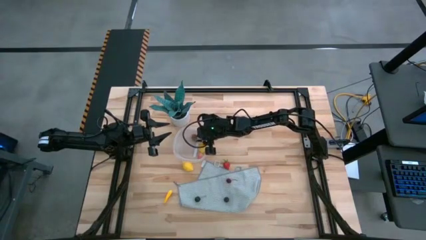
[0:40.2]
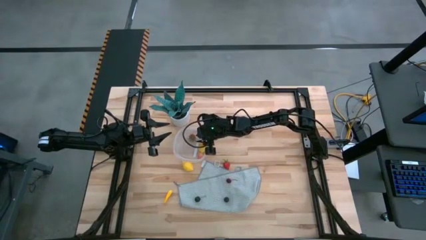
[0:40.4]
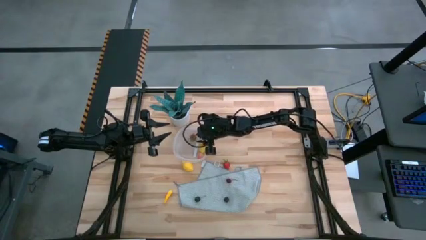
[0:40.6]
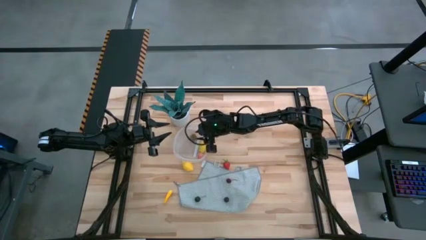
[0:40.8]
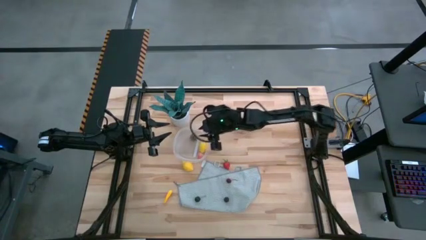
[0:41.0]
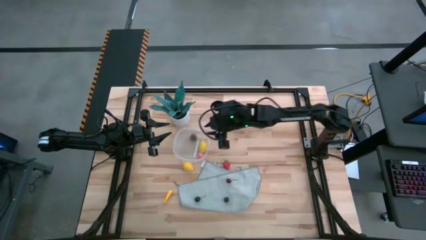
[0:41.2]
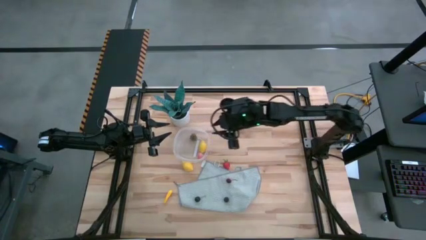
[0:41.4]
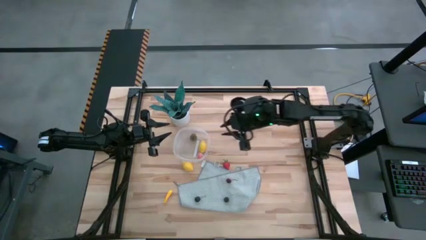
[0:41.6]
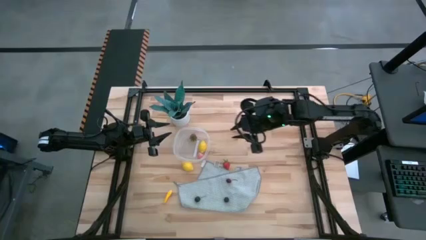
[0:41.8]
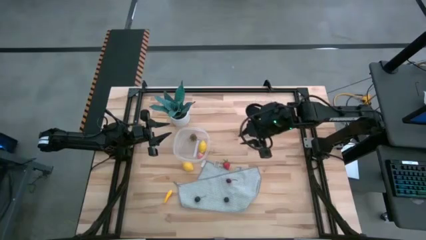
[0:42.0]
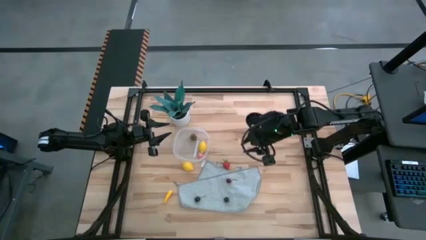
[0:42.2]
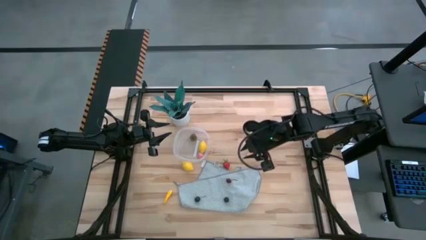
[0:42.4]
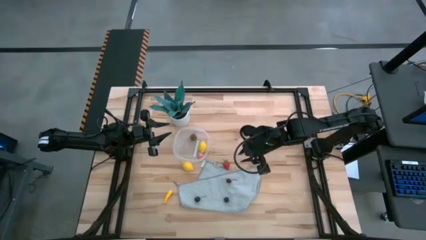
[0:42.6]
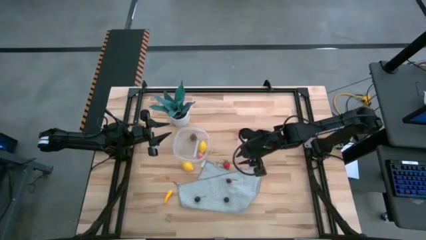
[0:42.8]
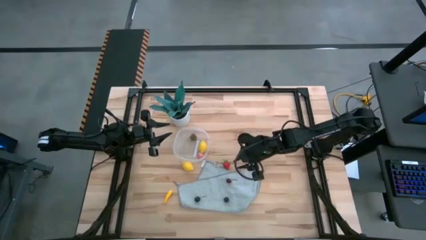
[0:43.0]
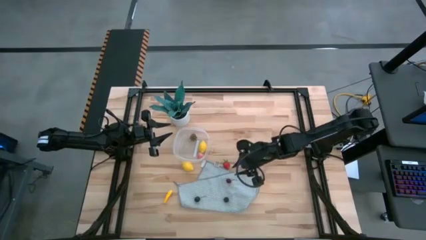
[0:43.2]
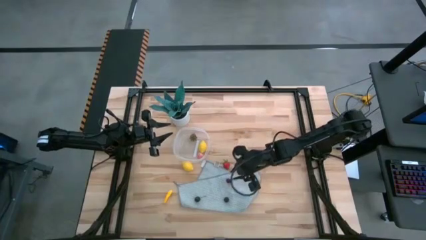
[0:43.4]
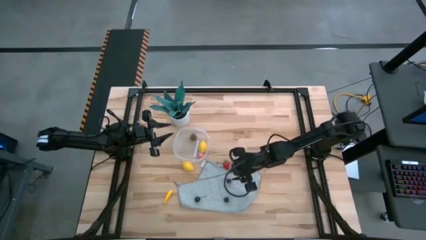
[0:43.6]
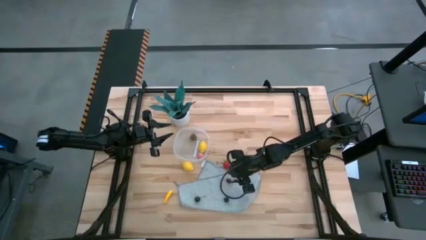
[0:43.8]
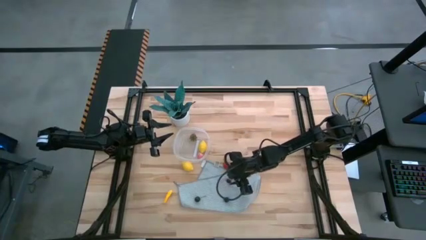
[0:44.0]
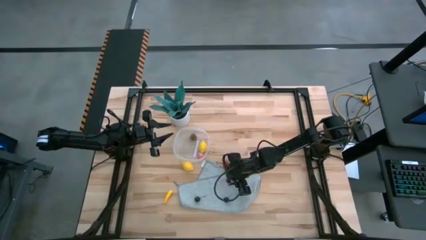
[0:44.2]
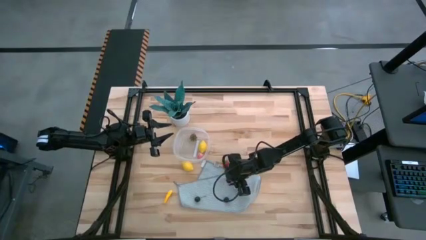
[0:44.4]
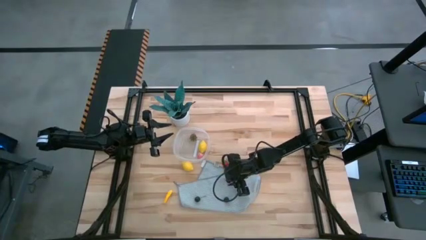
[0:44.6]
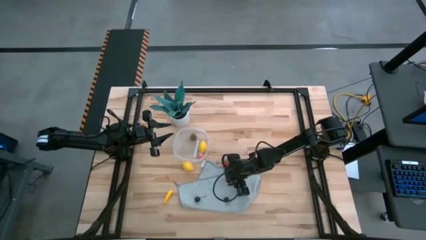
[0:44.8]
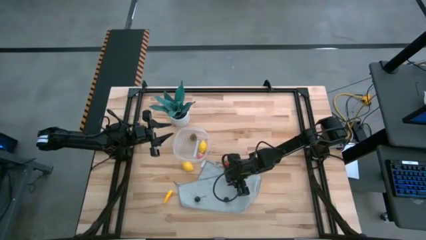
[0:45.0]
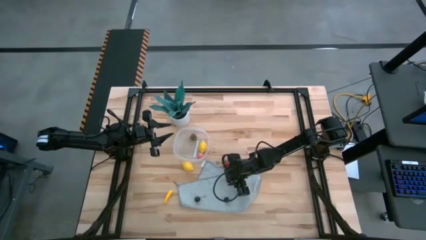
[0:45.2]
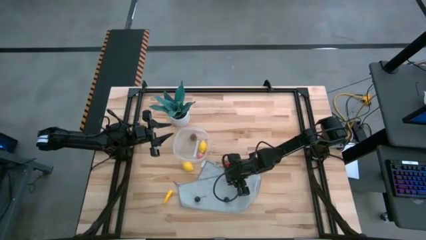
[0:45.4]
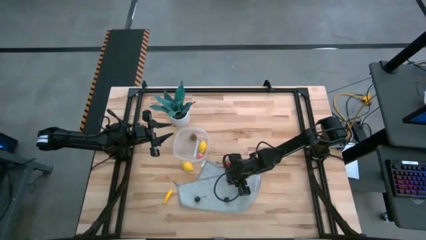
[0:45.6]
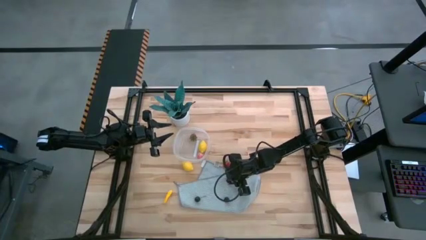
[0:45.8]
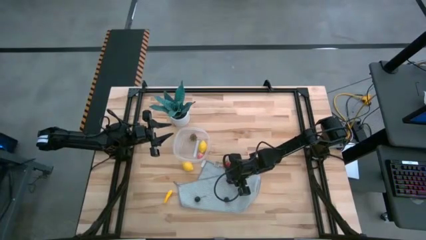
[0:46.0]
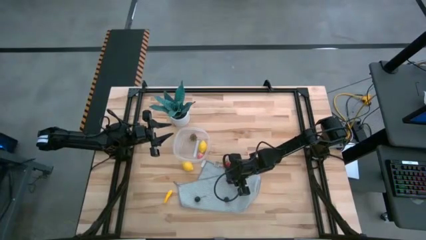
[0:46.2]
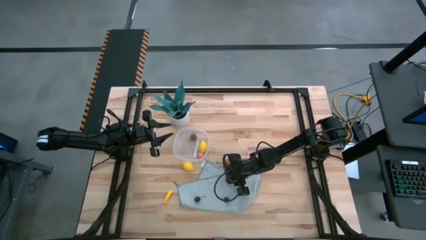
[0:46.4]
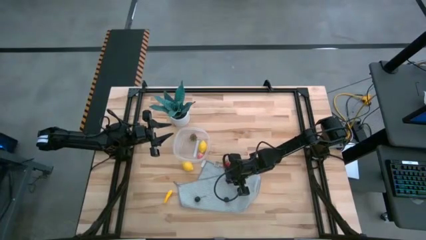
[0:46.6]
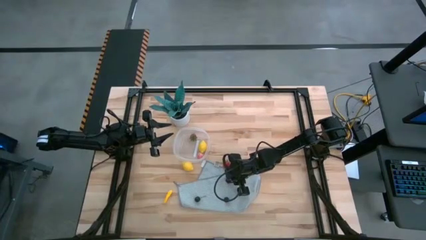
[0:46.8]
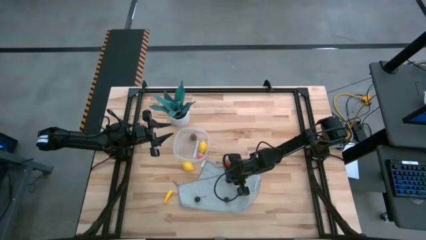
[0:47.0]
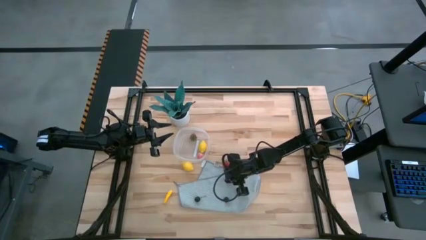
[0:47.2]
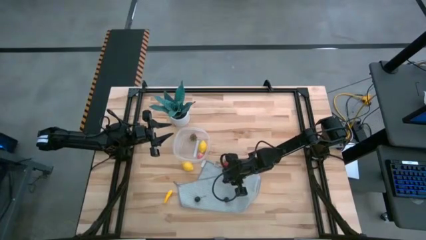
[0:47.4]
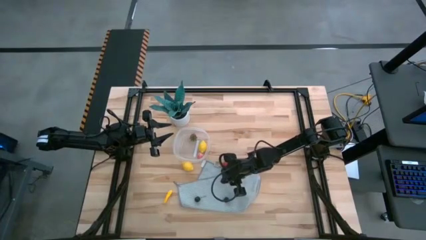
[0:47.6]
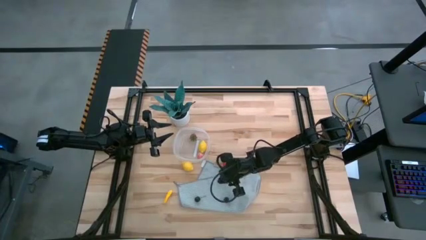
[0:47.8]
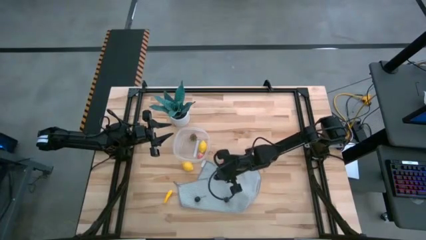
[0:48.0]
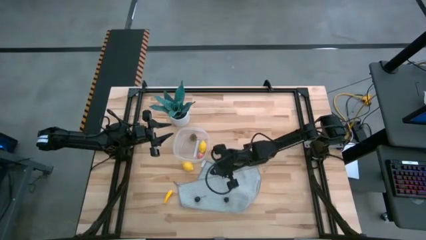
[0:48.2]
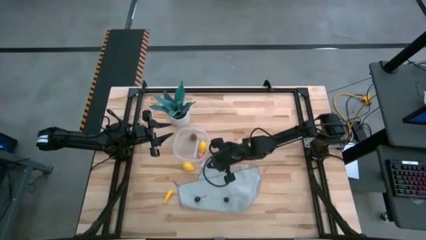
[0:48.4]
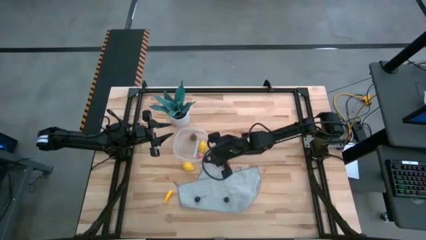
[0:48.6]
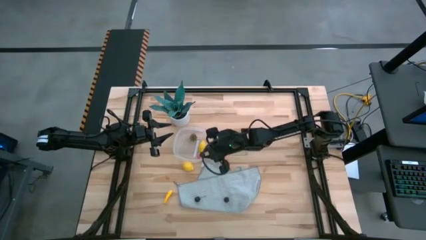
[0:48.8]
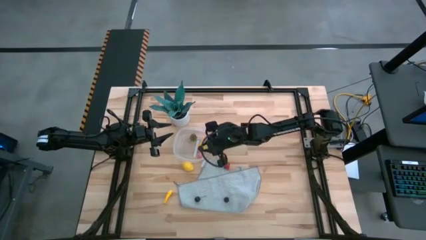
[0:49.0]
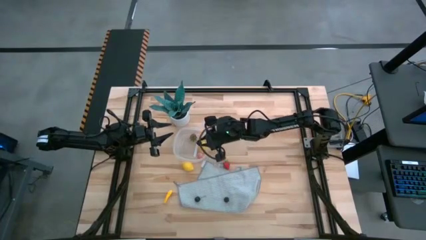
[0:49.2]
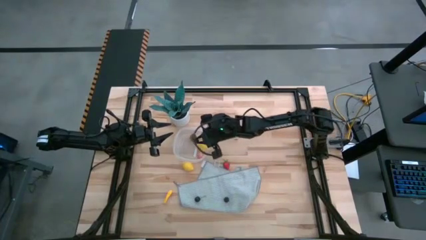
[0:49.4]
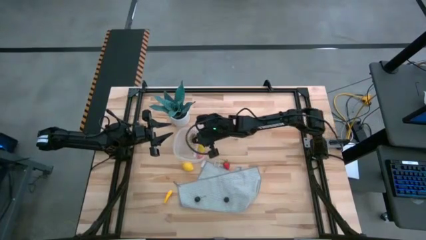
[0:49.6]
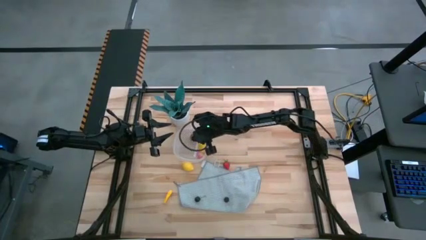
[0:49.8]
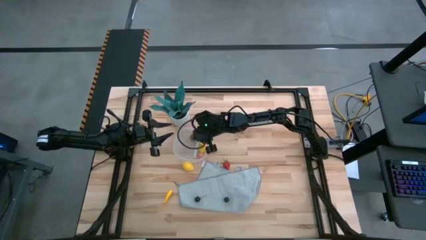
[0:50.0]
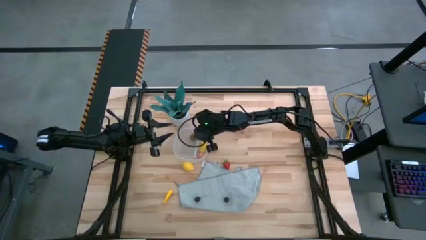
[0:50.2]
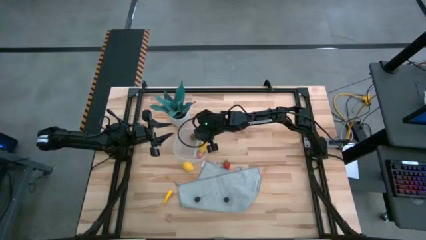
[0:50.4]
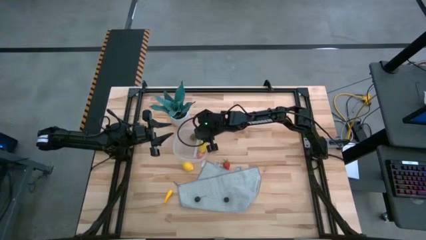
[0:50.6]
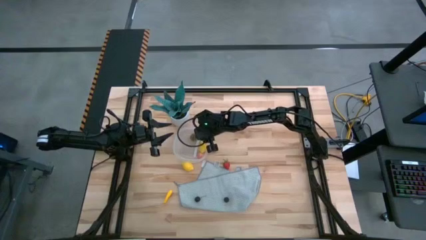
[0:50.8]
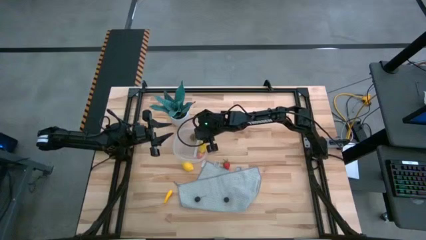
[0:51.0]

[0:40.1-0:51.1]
Task: Pick and placing Produce into tupperware
Put the red cherry into the container
